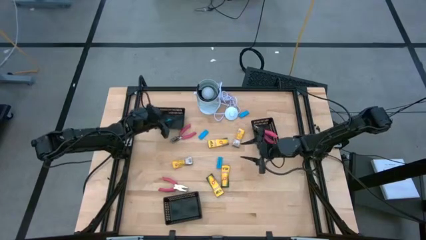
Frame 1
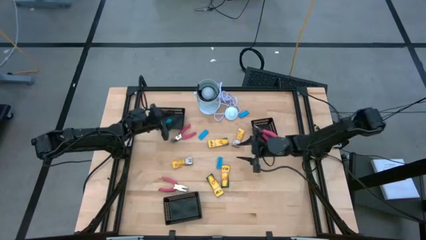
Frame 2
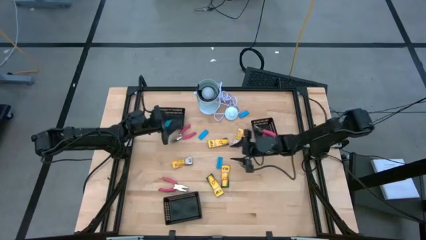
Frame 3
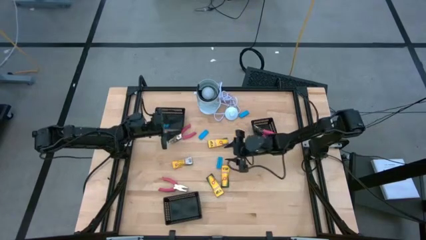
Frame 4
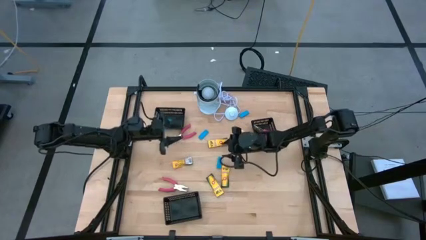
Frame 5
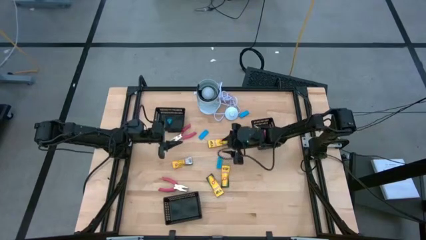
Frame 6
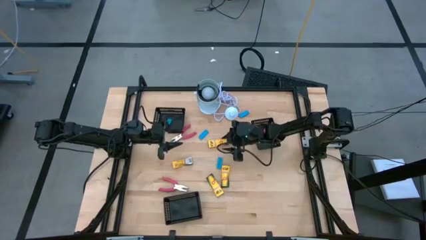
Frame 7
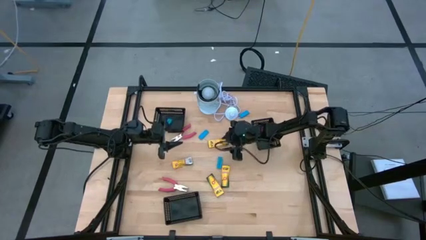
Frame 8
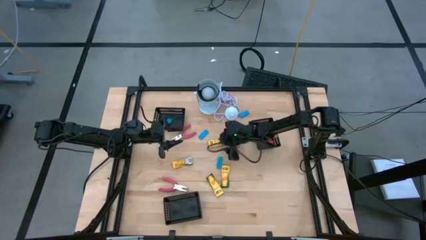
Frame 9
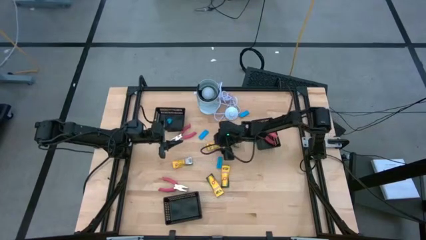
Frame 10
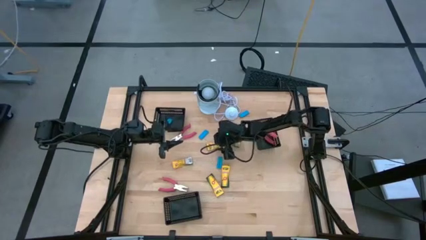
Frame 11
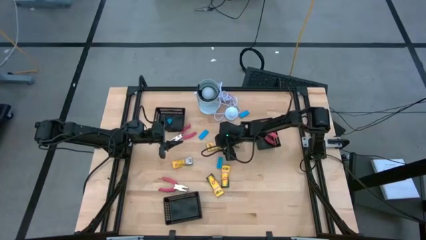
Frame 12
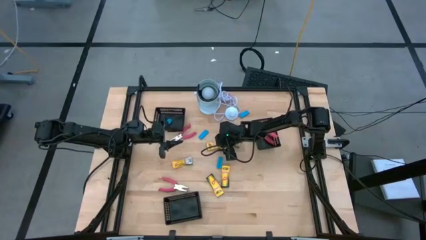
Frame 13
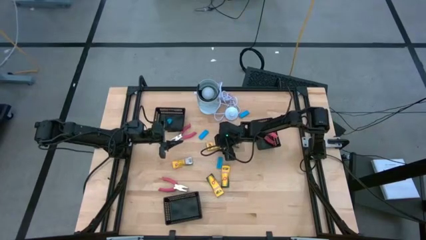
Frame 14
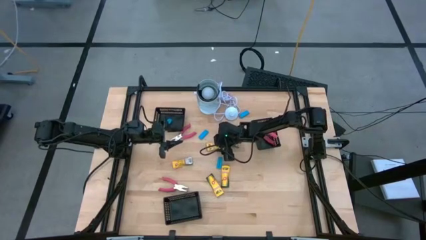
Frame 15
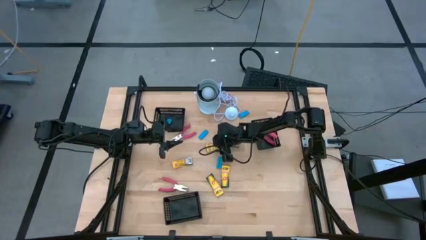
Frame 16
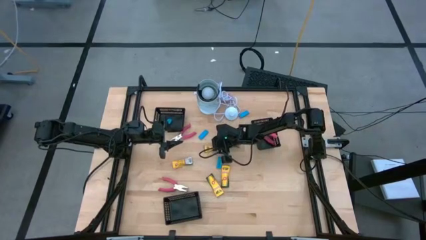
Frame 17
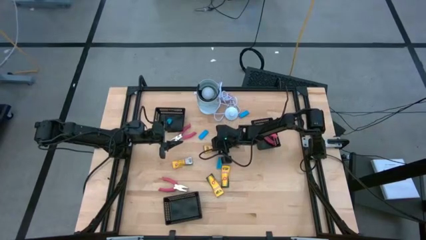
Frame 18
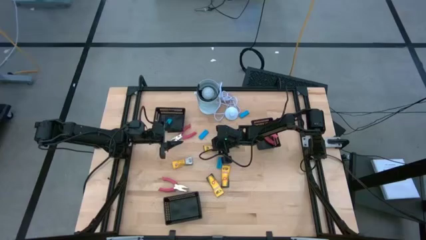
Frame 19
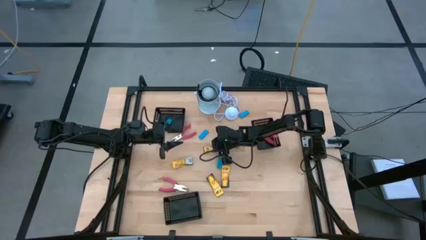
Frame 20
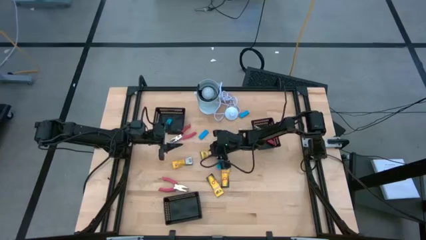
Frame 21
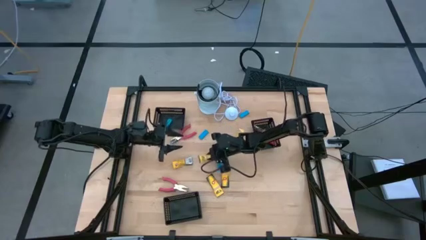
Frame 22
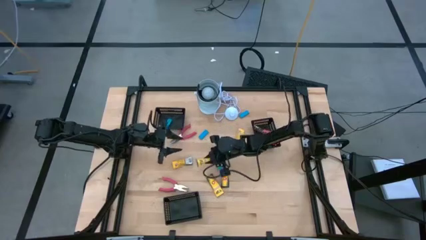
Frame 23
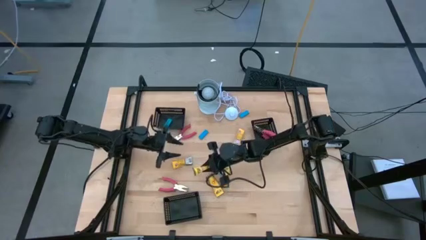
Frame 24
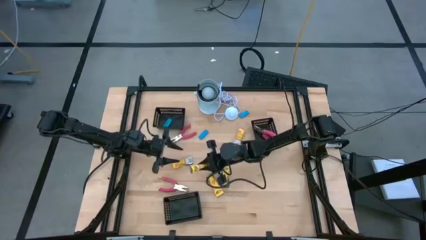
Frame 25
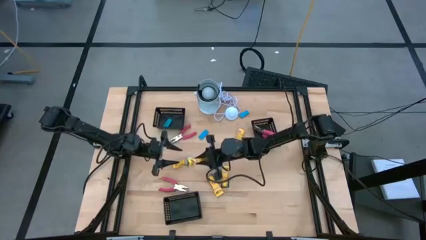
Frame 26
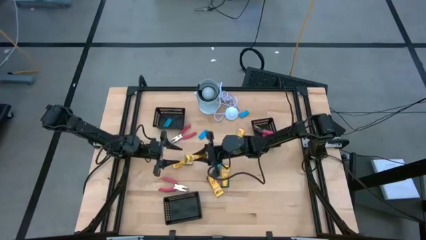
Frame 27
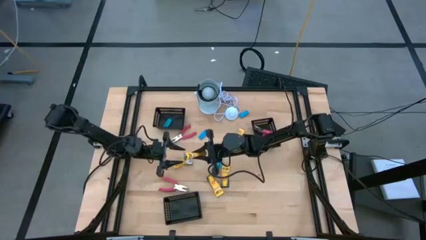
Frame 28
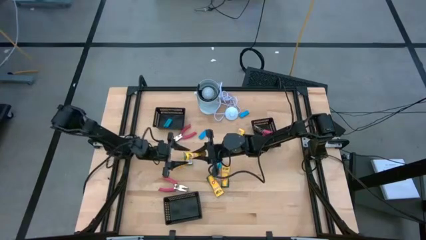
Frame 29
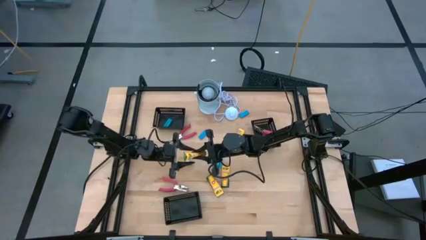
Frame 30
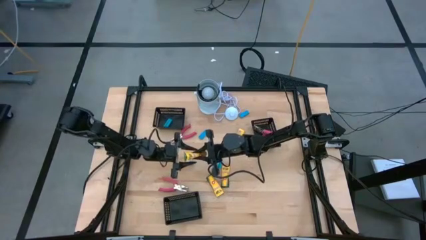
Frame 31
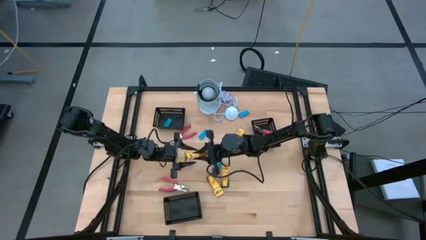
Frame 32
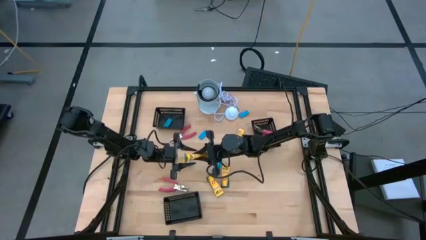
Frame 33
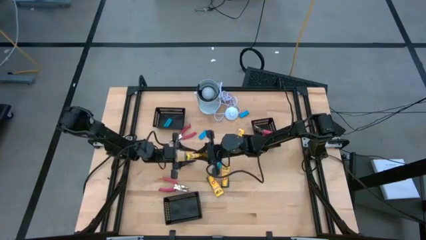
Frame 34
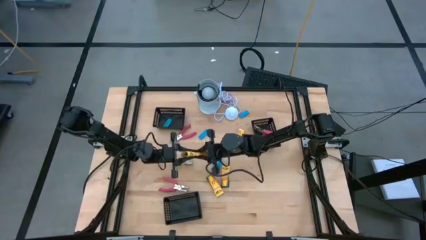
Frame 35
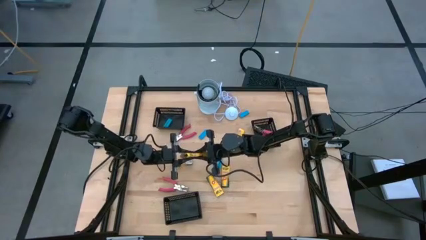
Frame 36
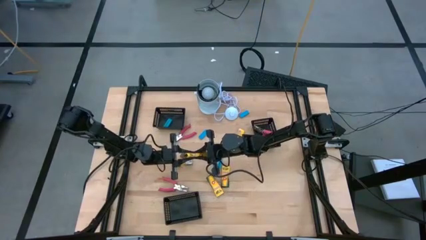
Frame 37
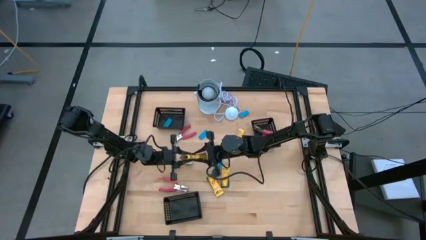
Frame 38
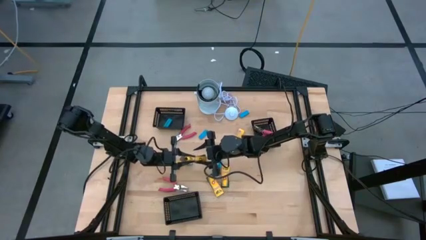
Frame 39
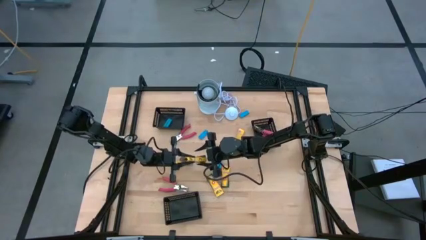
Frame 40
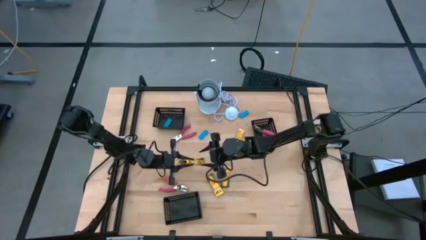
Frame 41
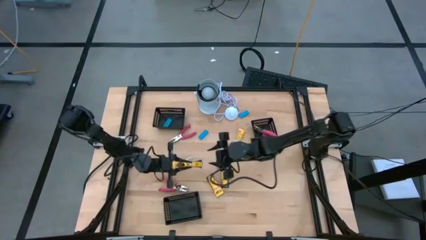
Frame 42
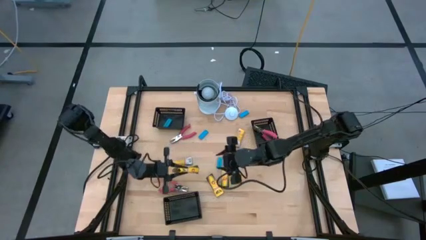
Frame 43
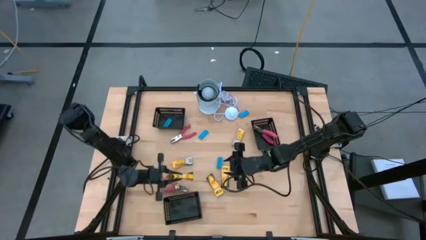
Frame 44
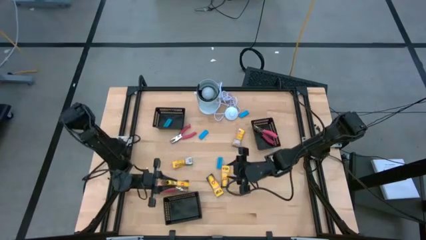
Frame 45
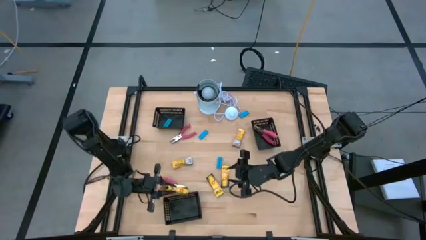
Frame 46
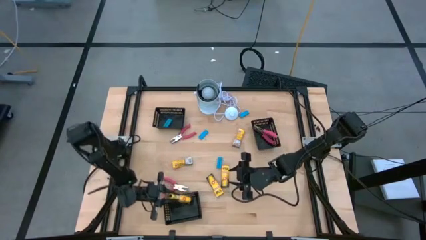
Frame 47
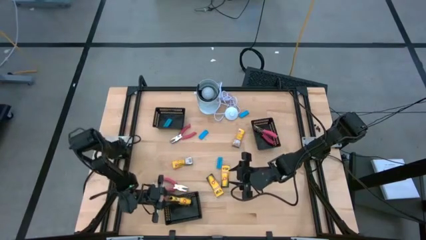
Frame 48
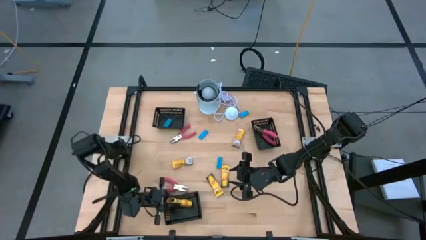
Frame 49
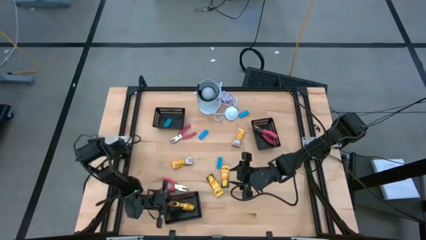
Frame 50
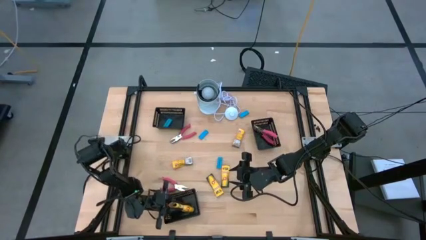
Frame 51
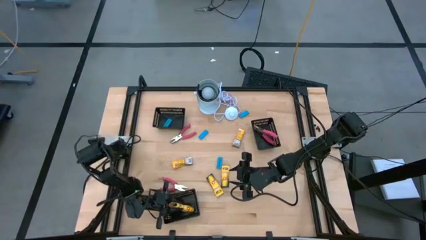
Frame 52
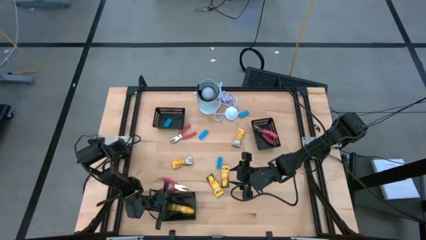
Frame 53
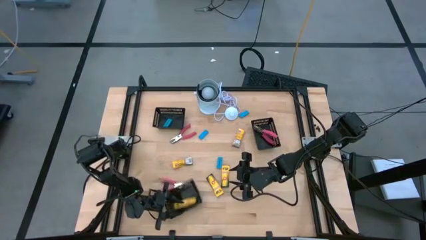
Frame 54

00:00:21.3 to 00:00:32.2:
Task: Pick & Place School Supplies
Put the yellow crayon box into the bottom black bin

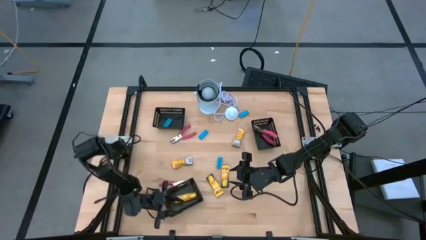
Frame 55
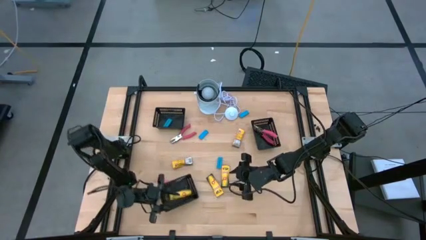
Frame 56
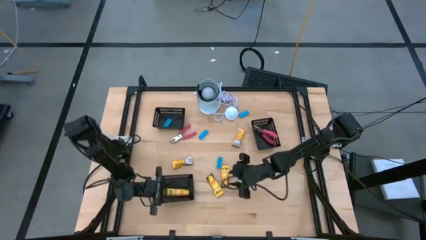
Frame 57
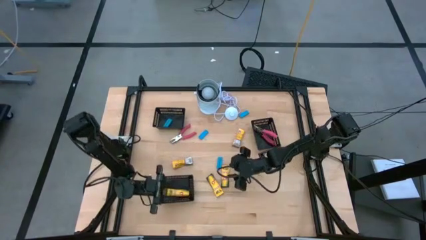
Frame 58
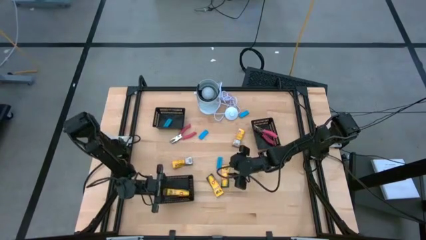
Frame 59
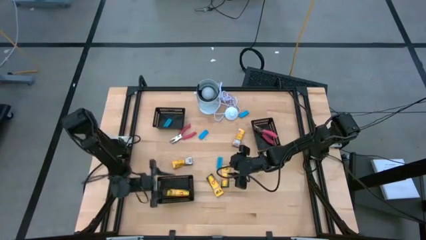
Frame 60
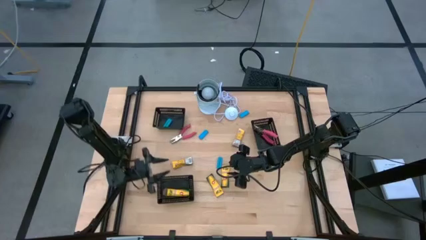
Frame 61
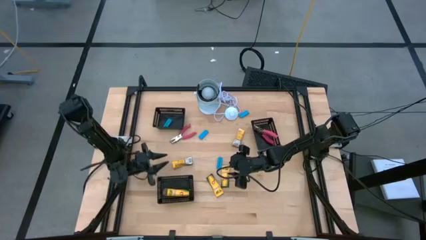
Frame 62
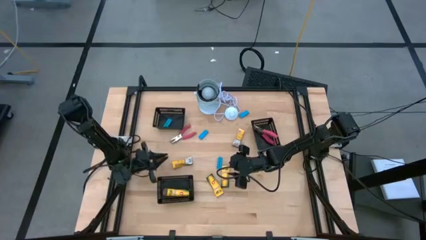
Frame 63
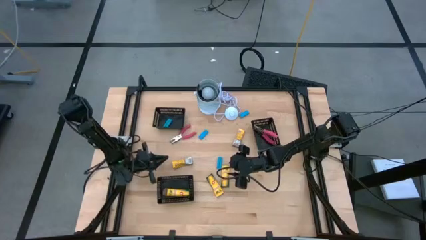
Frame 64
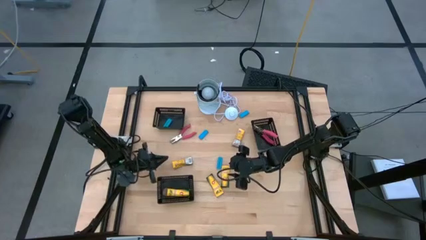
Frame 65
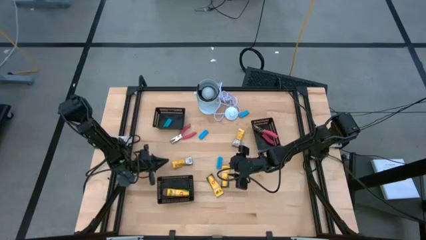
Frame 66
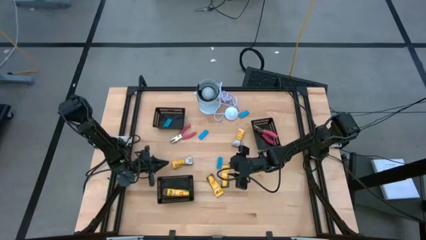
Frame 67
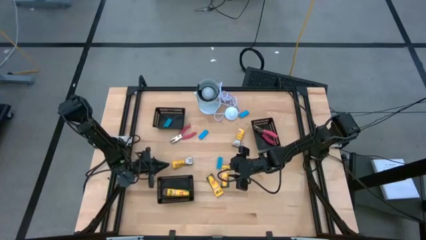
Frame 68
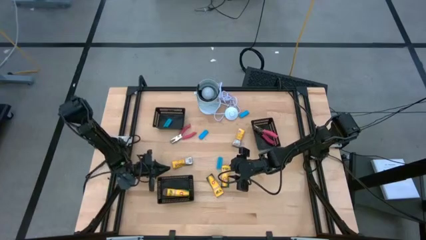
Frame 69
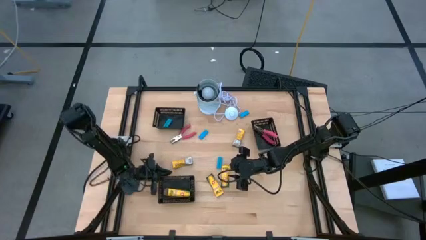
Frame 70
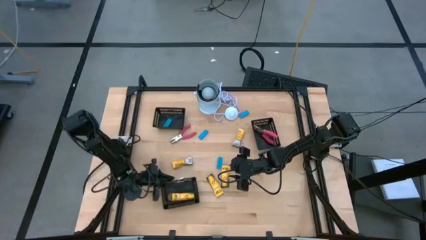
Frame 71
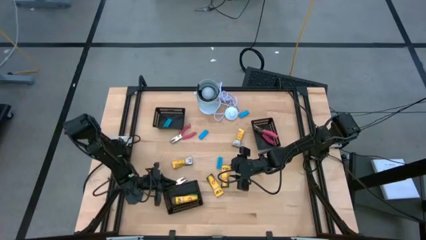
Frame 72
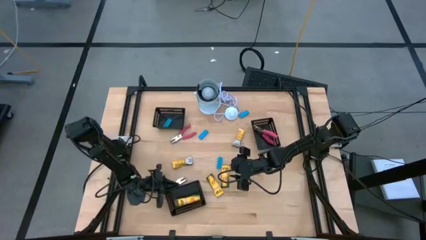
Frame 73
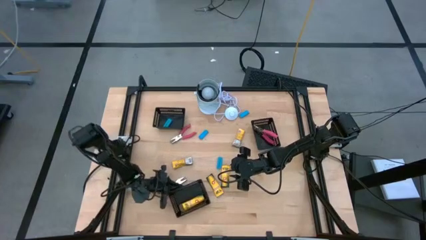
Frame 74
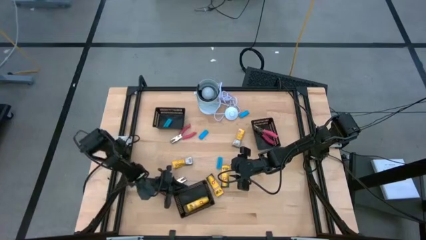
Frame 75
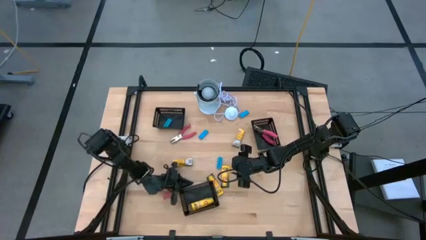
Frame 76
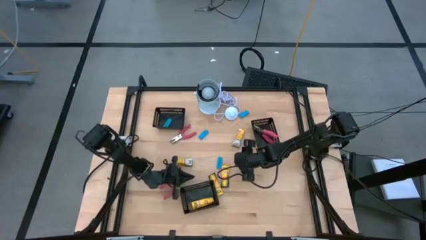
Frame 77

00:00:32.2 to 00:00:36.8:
Move the bottom black bin to the bottom center of the table
